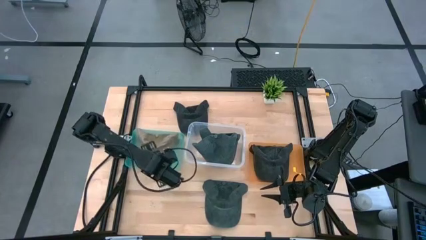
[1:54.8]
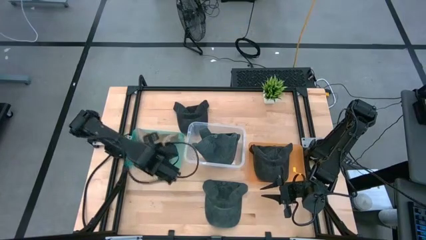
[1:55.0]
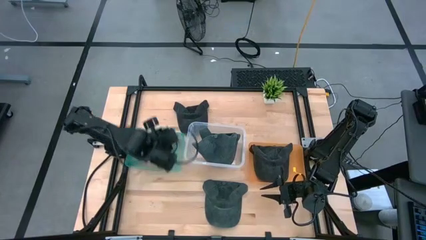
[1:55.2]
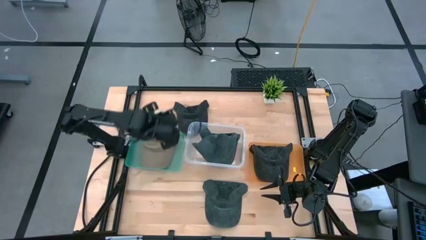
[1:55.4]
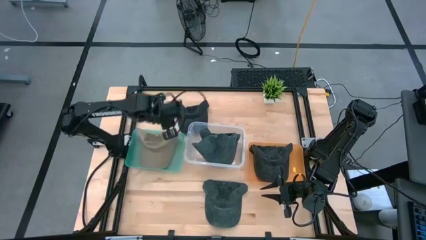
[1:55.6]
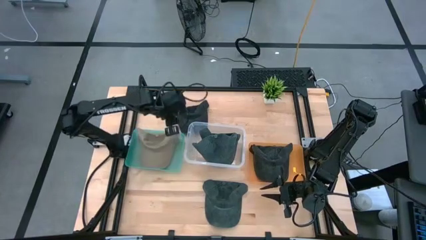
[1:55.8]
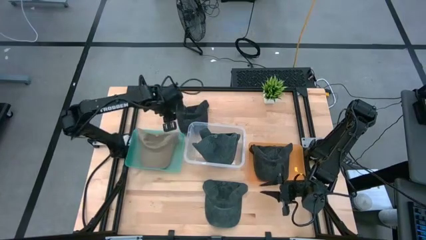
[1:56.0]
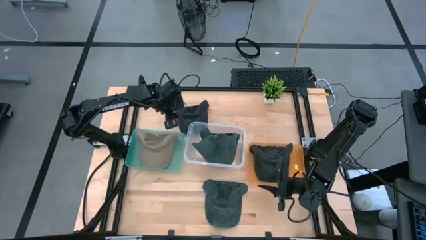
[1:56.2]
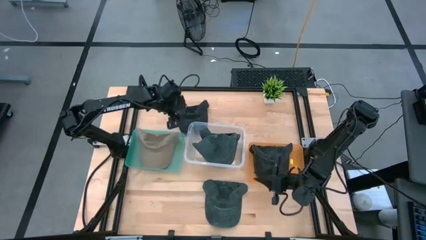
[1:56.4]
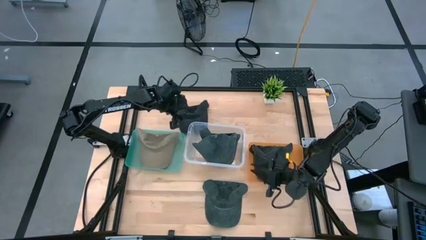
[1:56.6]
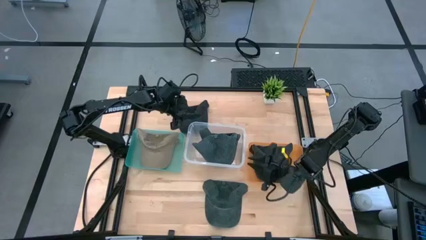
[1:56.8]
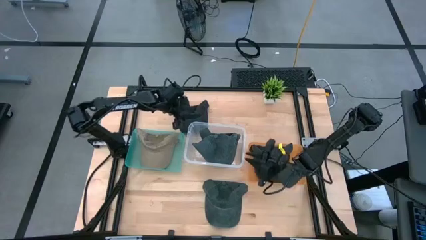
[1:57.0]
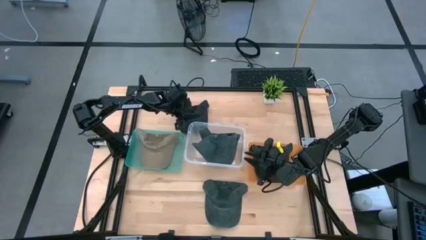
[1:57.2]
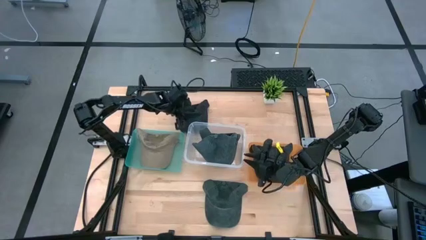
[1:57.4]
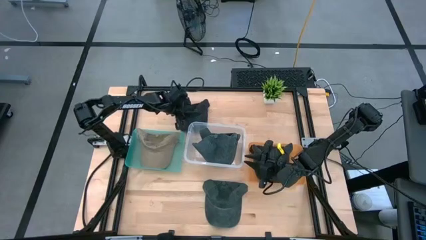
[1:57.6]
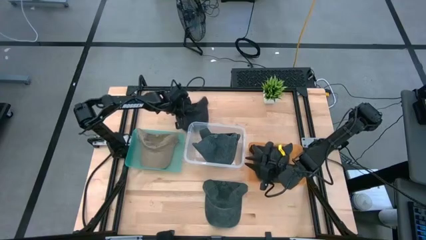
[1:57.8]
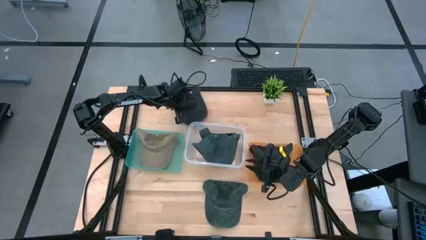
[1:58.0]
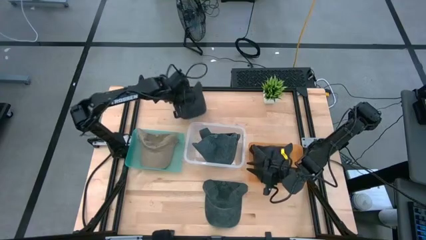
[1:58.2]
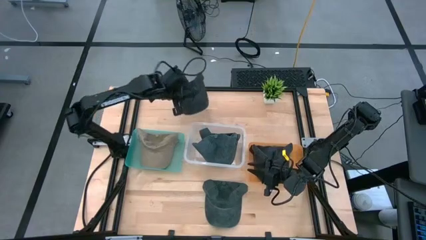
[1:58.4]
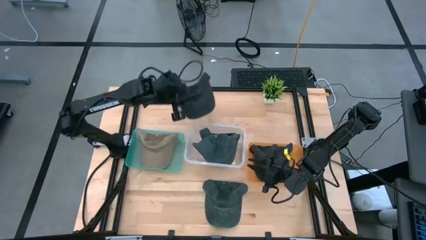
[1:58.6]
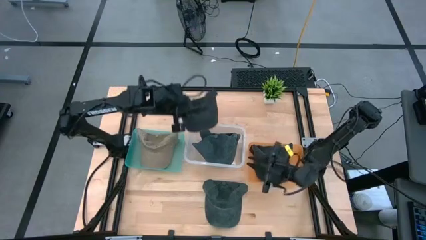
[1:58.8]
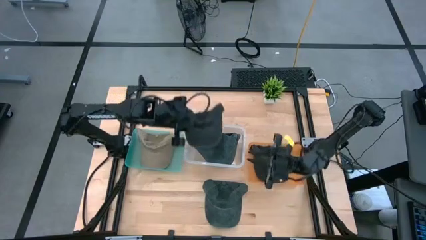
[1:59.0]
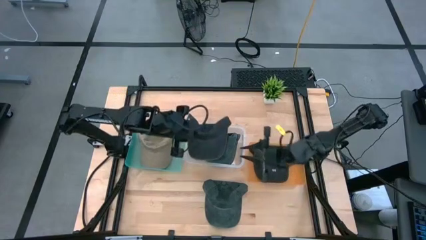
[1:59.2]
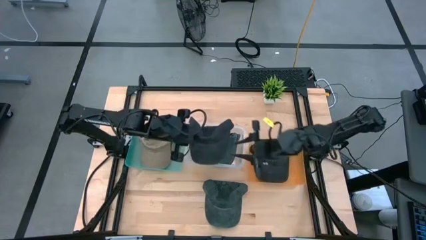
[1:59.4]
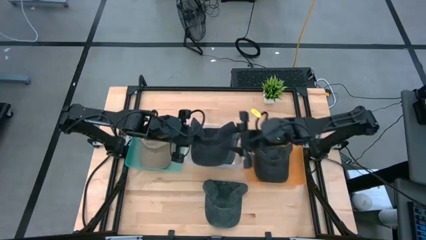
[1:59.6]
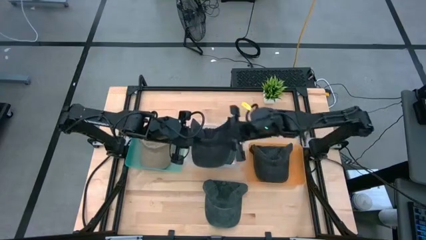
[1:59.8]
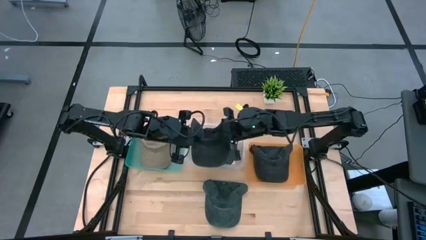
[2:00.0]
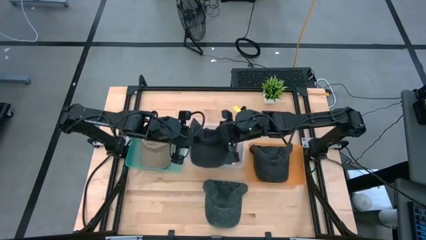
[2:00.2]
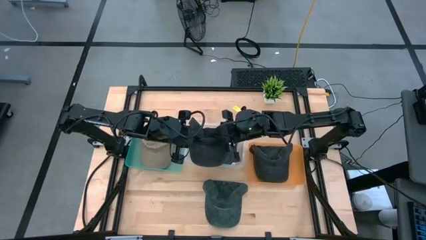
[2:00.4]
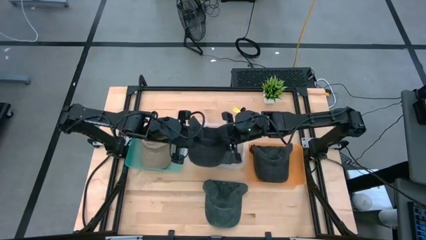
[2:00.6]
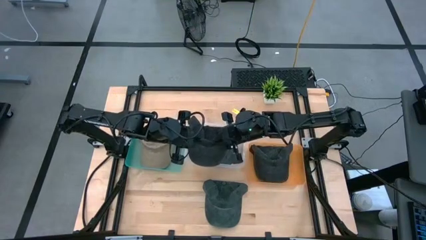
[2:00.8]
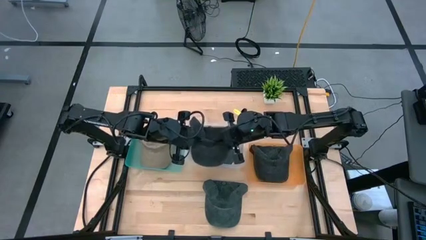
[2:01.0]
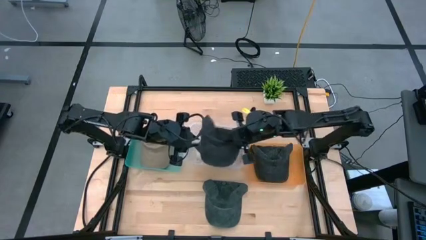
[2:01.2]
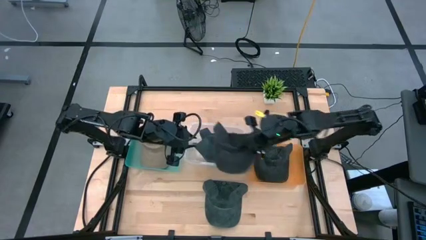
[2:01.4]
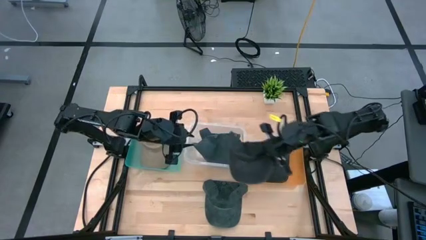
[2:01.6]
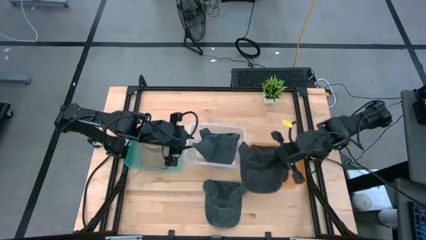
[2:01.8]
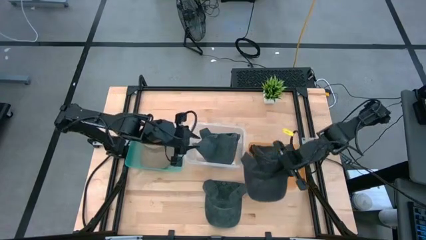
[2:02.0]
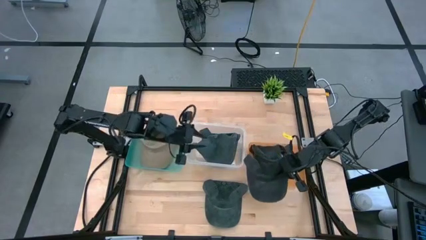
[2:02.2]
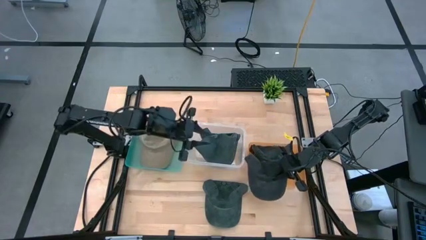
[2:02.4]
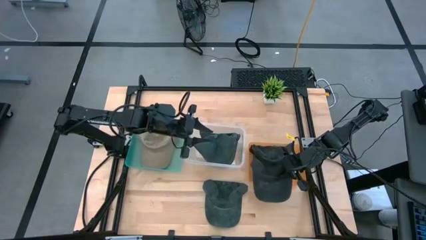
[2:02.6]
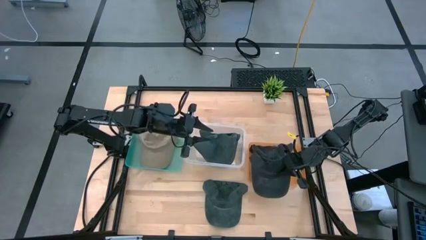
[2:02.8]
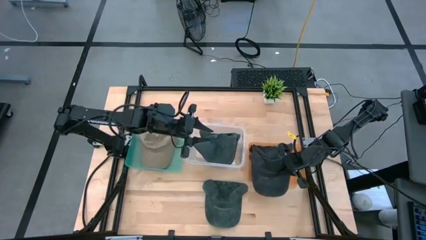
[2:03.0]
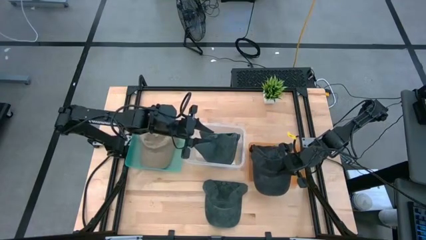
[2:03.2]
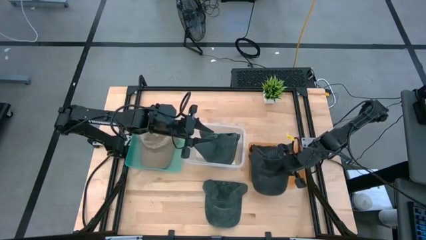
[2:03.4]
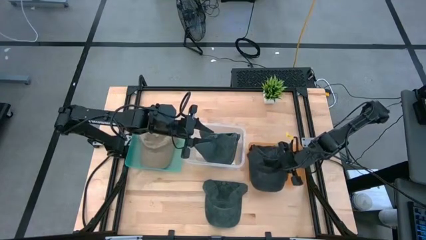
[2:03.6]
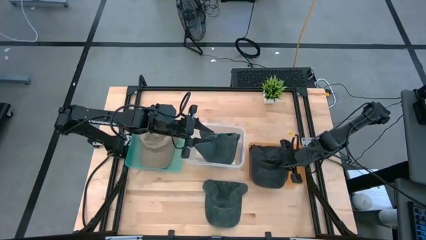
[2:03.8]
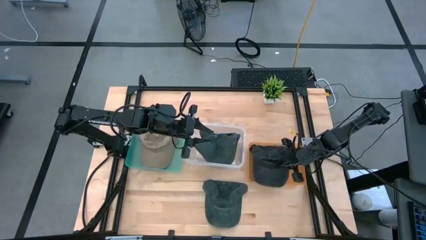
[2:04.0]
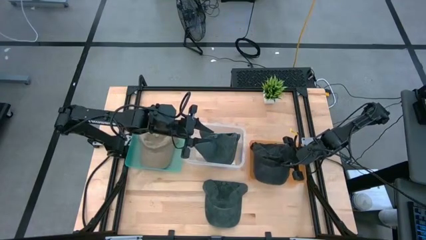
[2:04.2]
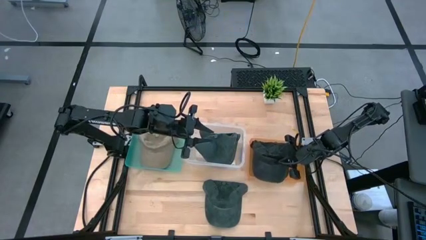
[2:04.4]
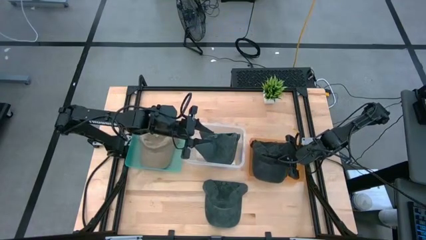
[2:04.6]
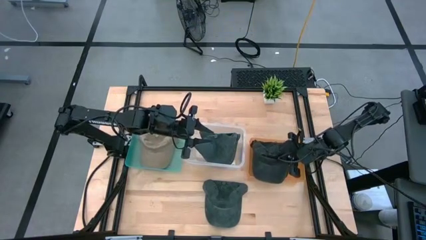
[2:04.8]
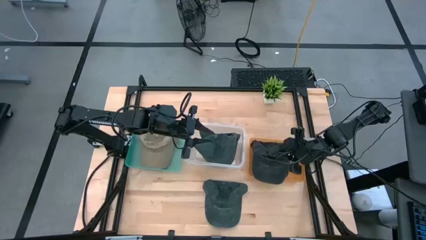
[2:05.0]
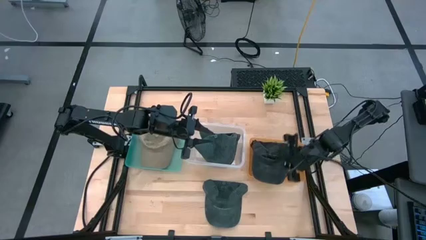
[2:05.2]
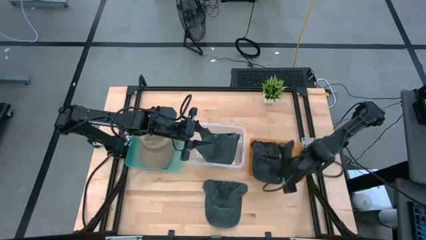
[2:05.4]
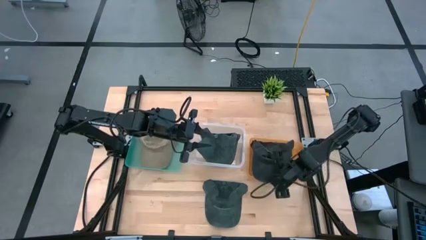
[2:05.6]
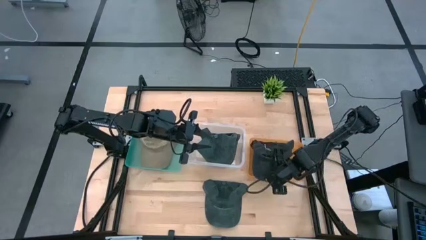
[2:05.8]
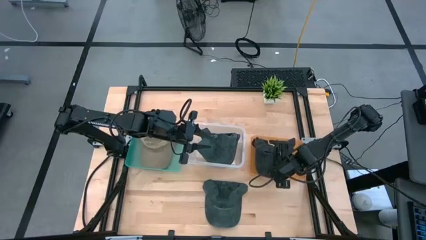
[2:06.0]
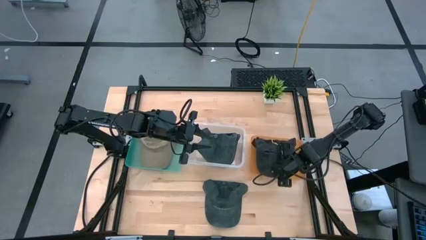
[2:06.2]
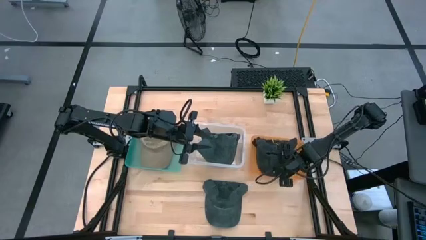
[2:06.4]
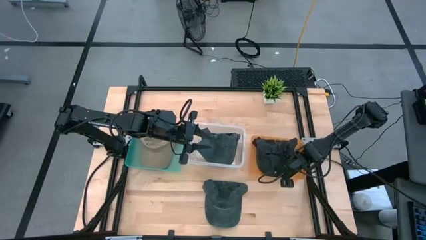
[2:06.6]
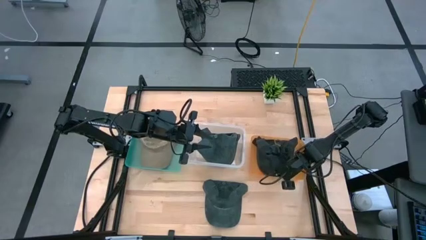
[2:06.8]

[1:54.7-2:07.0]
Task: Pick & Place hat
Put the black cap into the orange bin

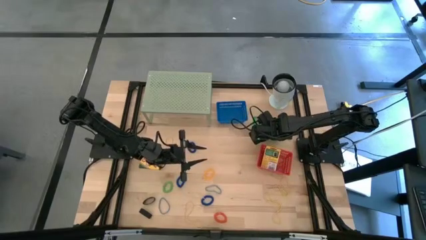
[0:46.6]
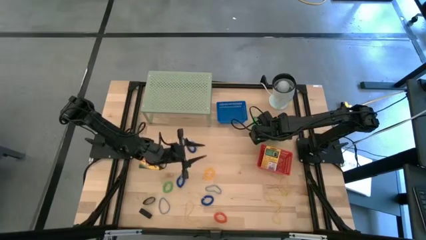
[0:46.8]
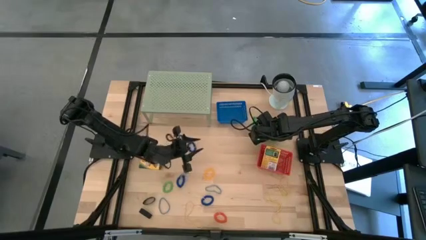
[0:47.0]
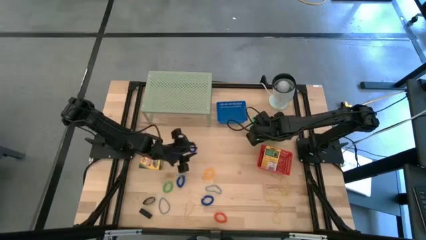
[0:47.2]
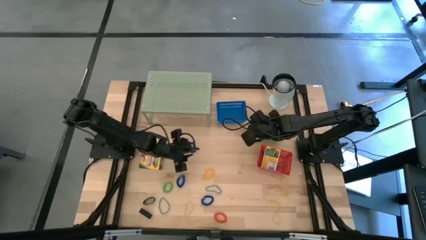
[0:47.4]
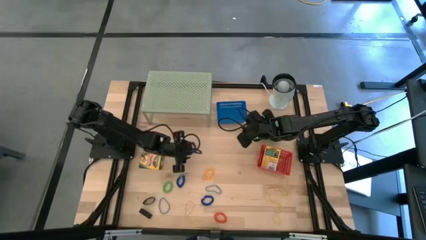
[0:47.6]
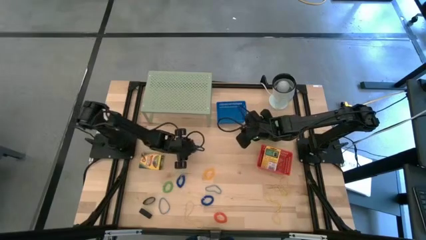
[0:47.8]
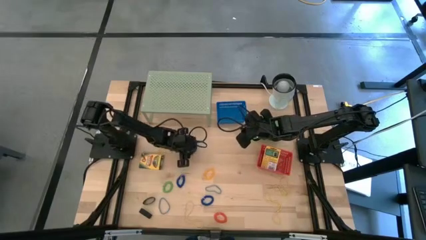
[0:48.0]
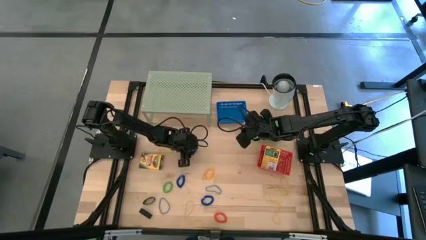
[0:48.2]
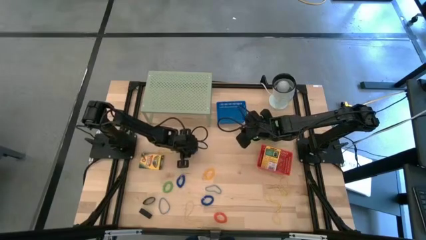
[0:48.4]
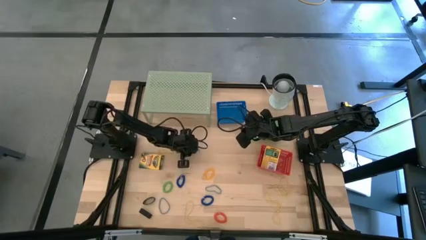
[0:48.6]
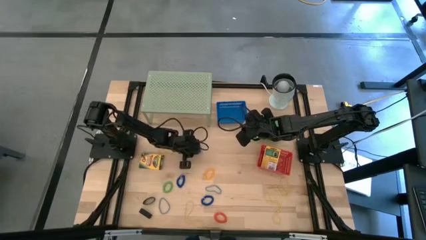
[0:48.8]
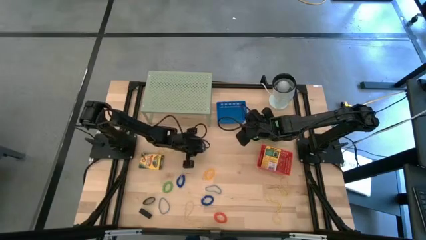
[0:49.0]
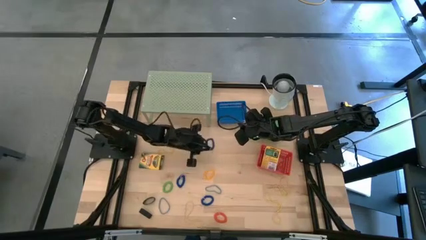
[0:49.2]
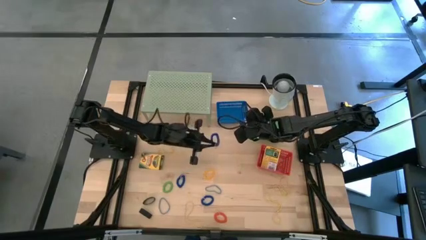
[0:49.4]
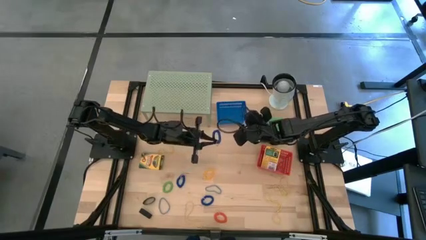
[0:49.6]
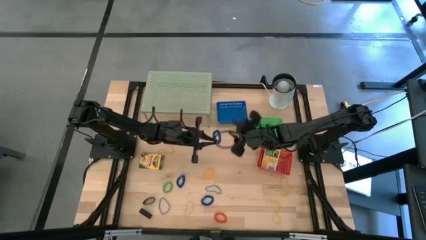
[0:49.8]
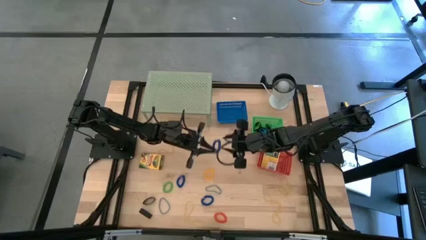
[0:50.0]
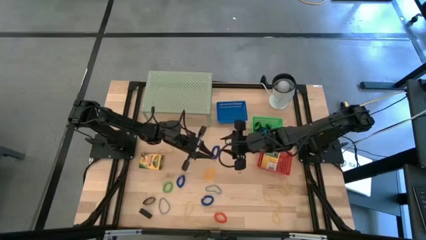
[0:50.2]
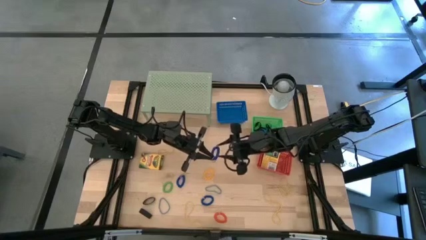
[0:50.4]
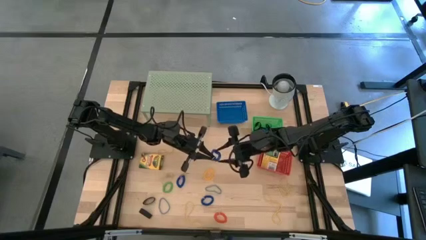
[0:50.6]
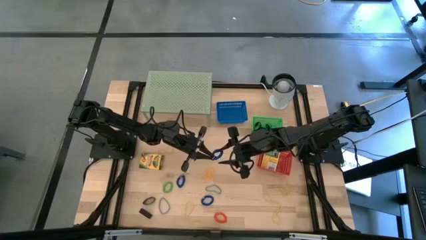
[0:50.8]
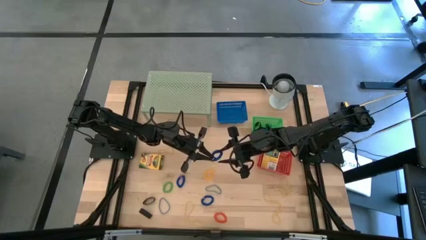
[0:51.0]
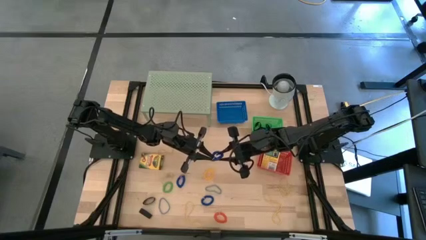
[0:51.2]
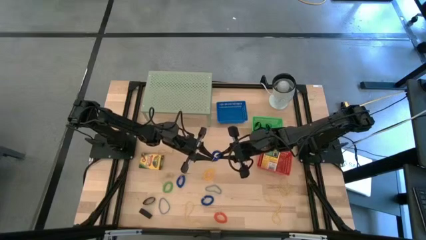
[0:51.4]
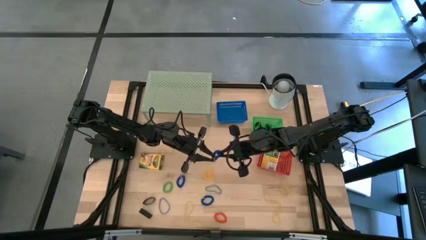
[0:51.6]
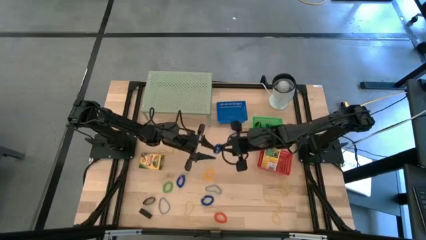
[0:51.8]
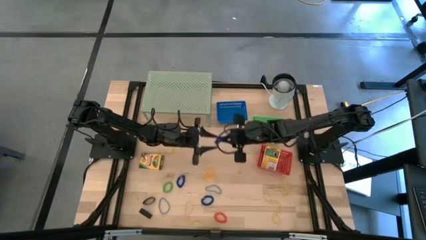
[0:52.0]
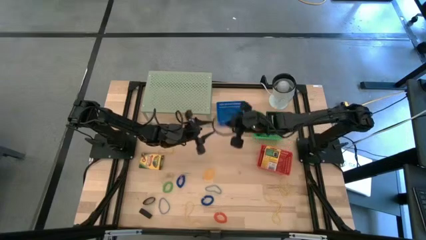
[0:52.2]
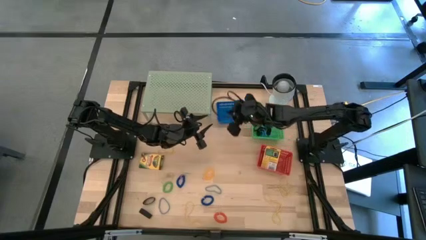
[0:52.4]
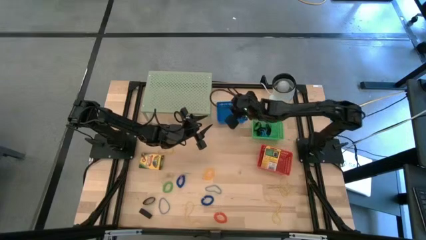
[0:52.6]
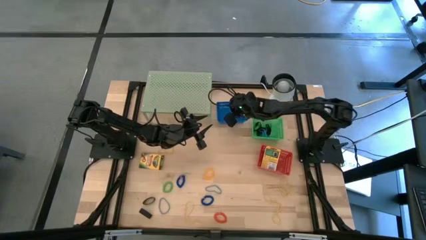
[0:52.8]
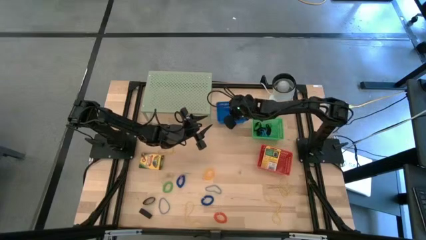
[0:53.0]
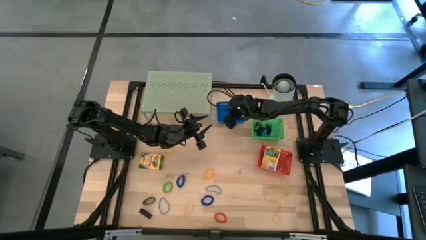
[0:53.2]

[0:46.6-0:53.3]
Task: Pick & Place Office Desk Supplies
Put the blue spring keychain into the blue bin
